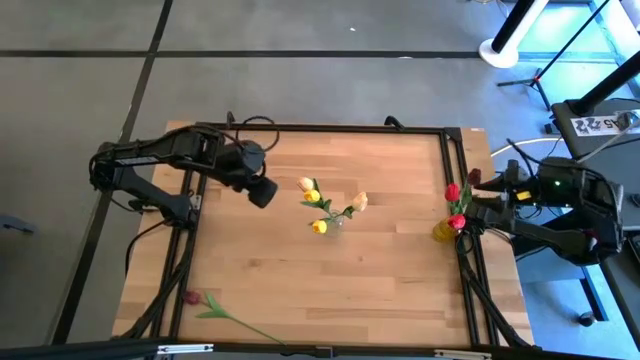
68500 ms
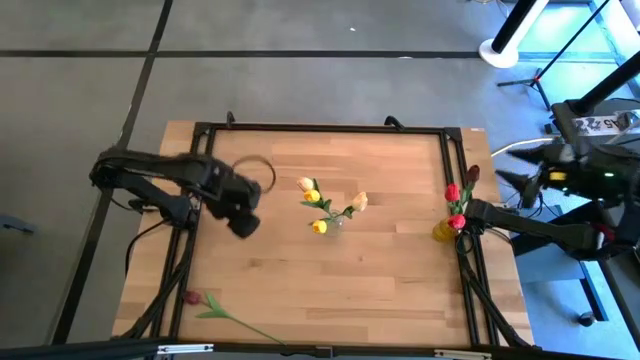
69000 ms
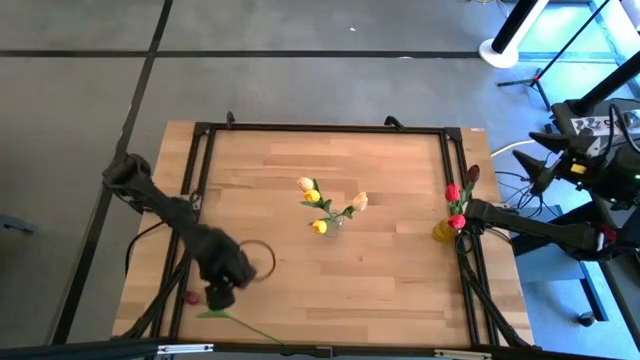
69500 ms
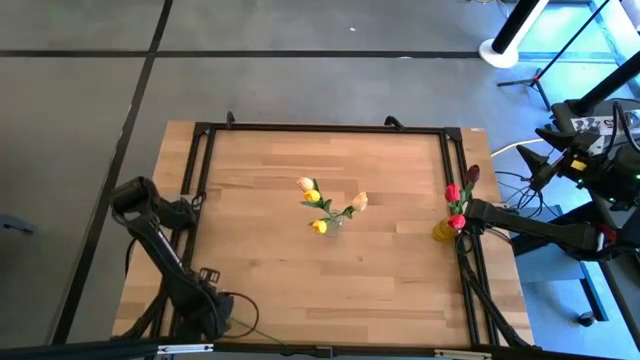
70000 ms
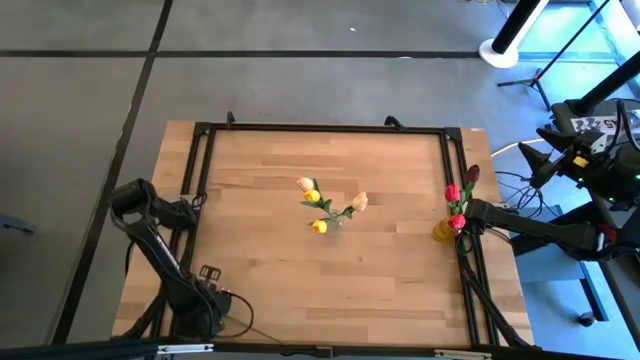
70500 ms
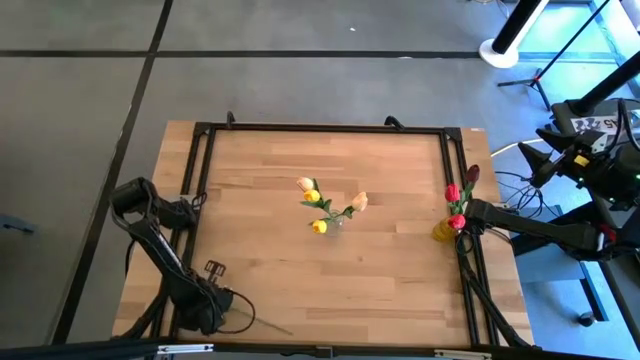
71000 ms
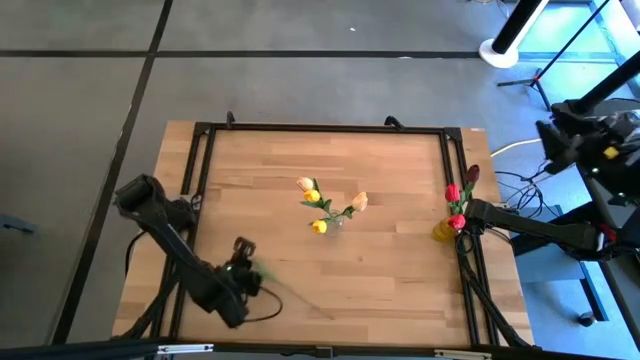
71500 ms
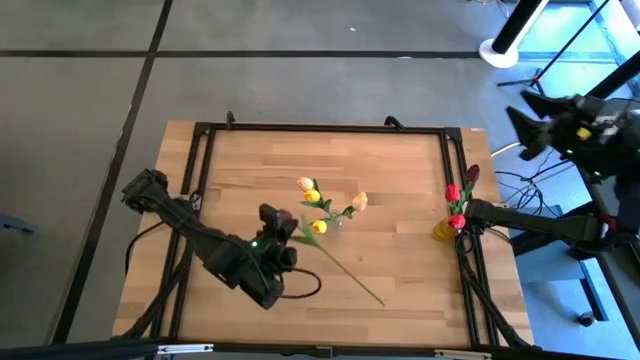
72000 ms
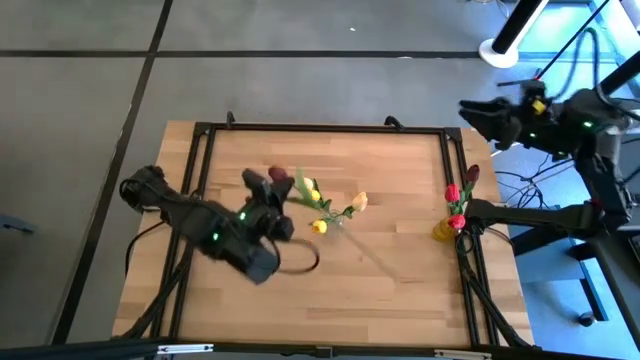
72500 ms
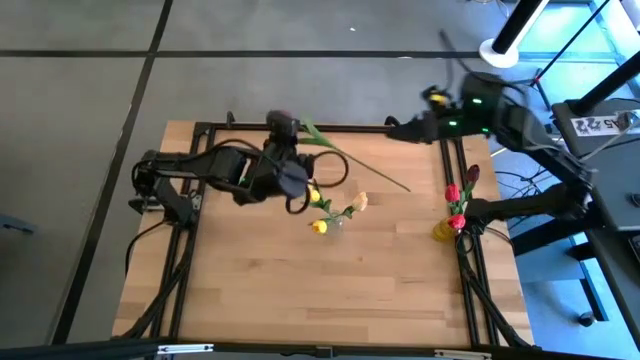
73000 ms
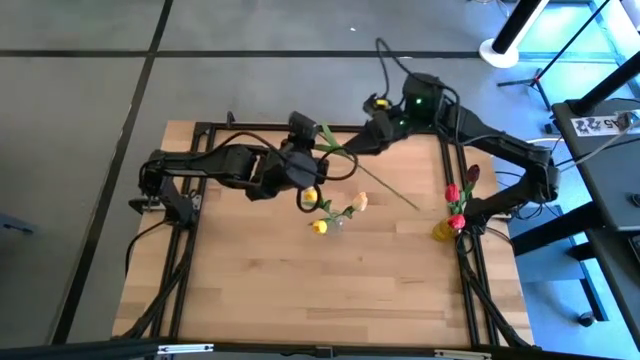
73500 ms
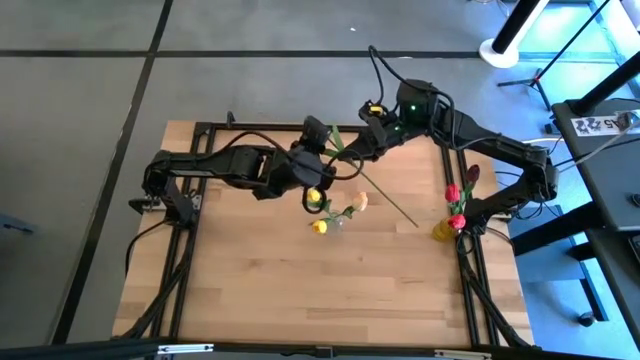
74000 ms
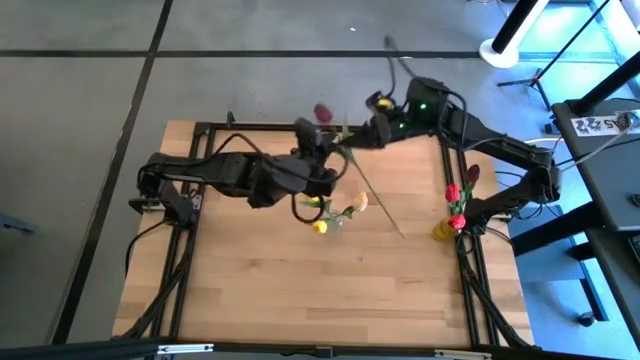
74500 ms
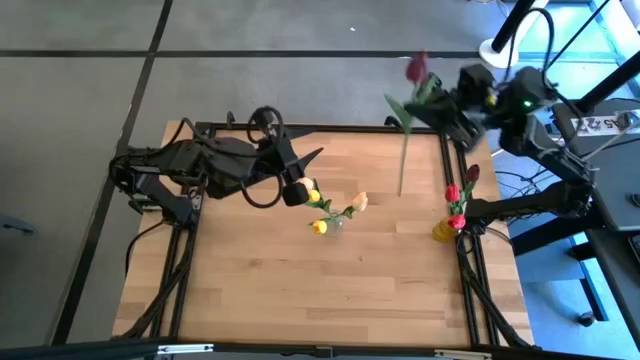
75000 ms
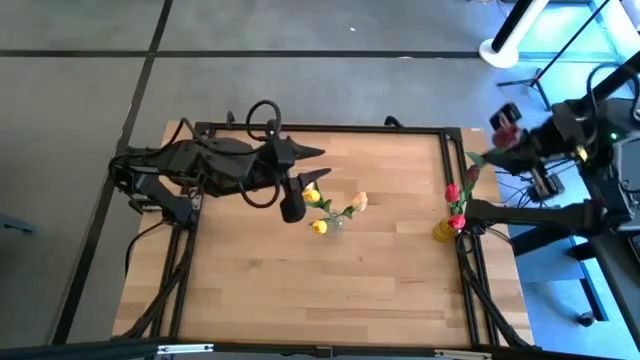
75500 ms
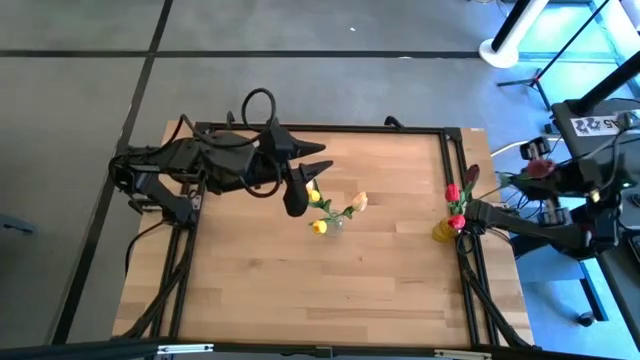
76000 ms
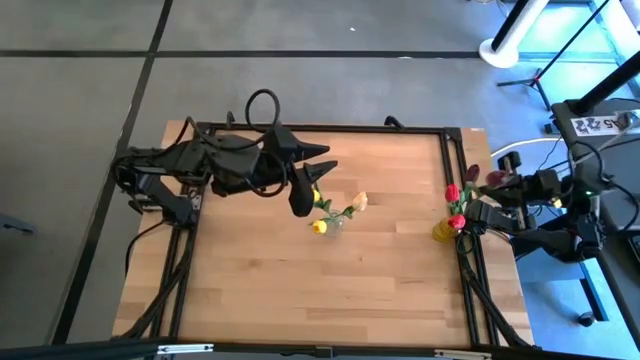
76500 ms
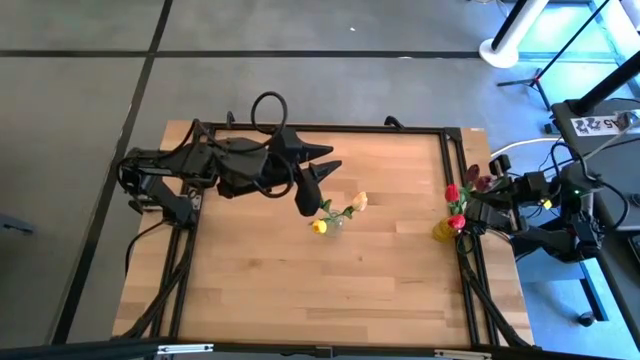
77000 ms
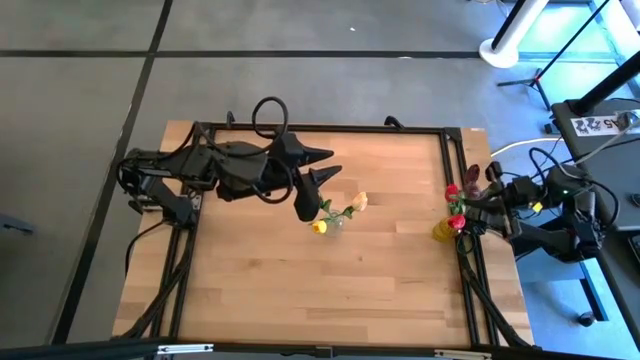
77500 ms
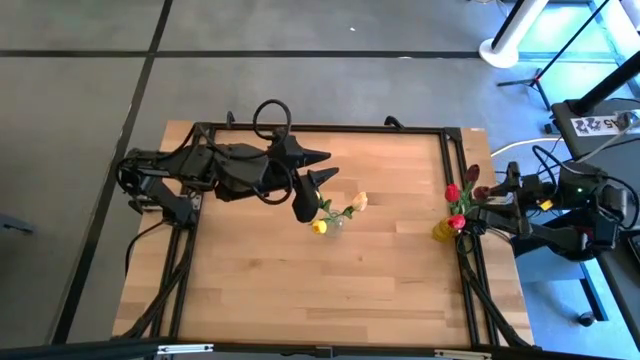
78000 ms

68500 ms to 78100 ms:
Task: Sort flowers into vase by color
Put the dark red tulip into the yellow vase

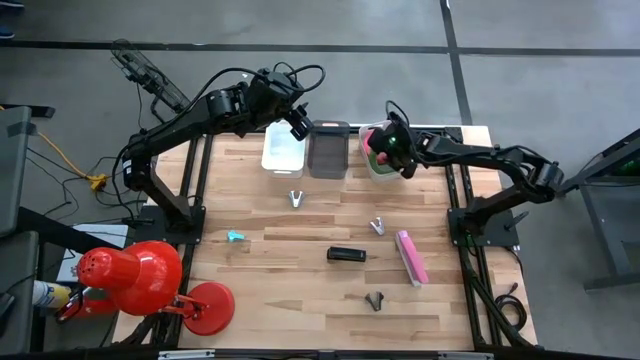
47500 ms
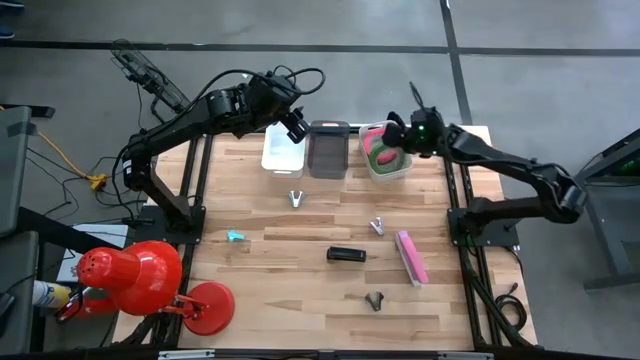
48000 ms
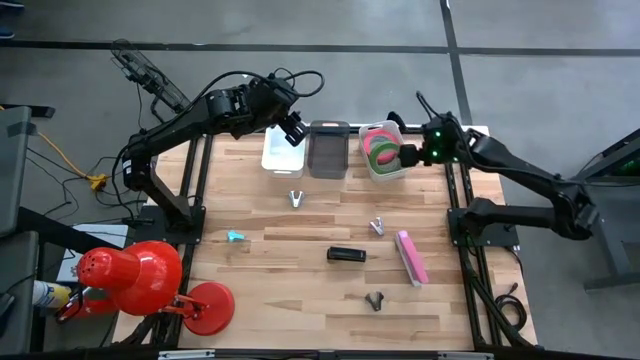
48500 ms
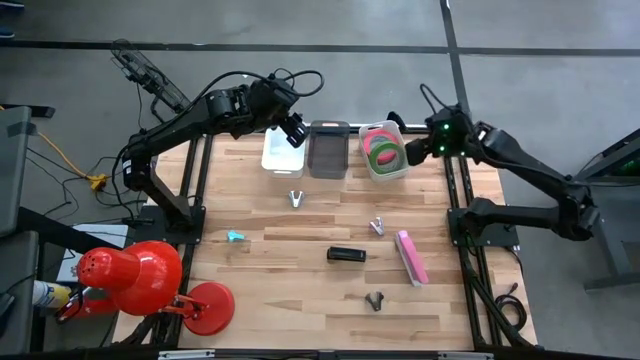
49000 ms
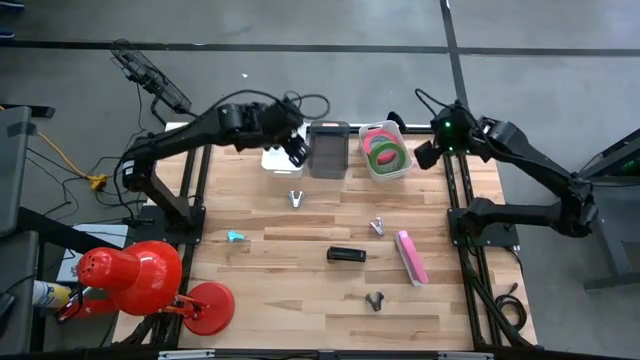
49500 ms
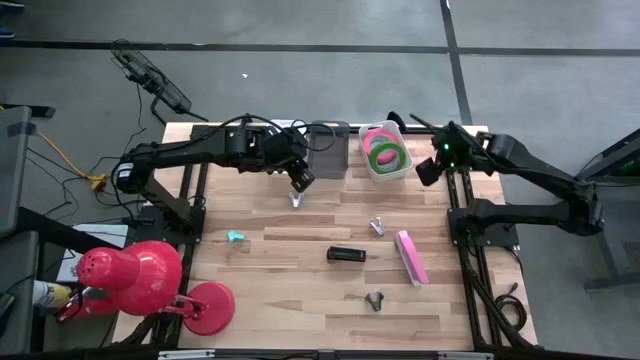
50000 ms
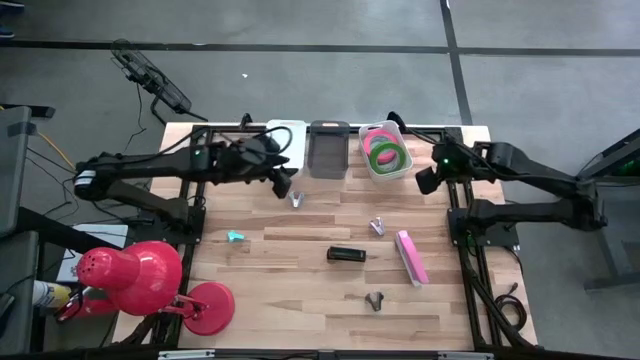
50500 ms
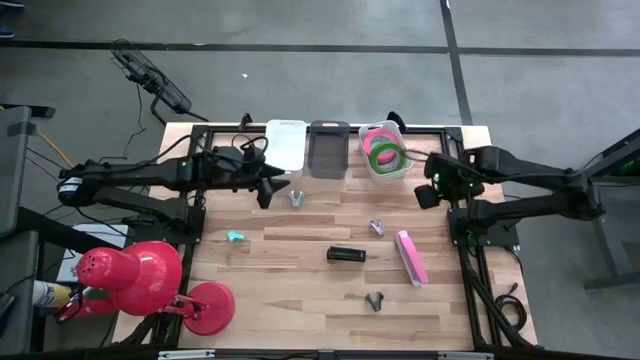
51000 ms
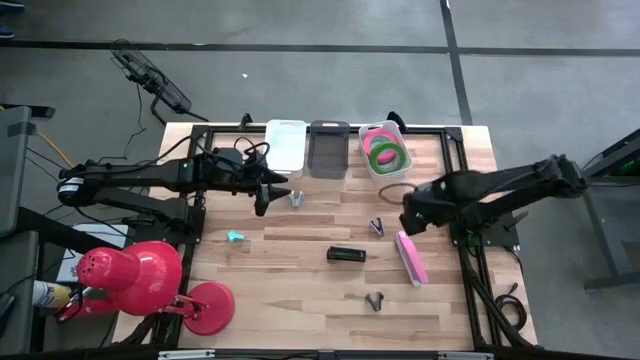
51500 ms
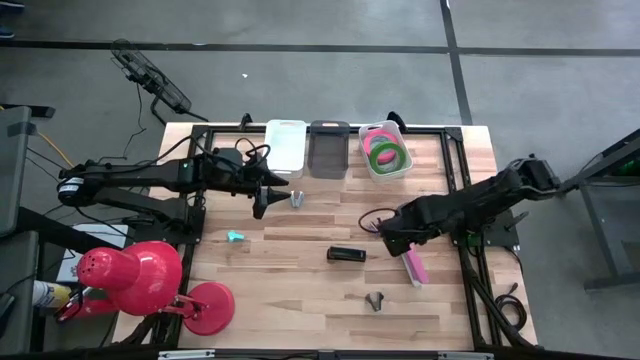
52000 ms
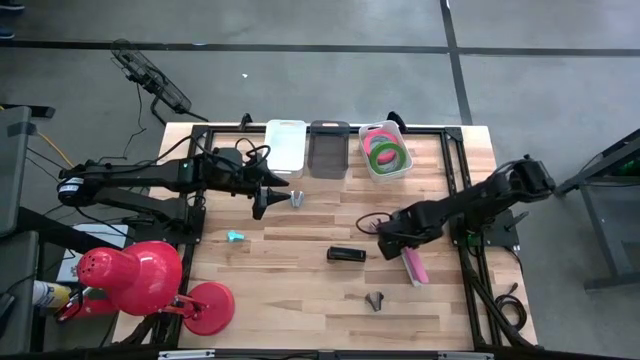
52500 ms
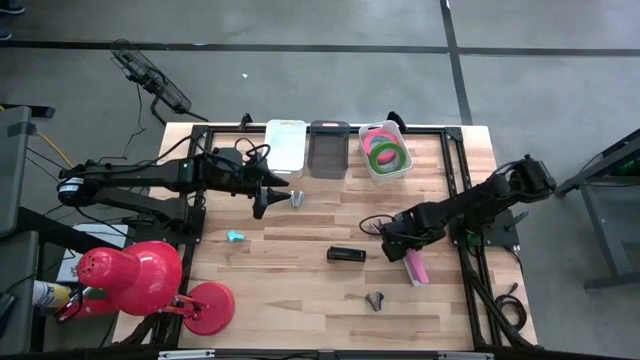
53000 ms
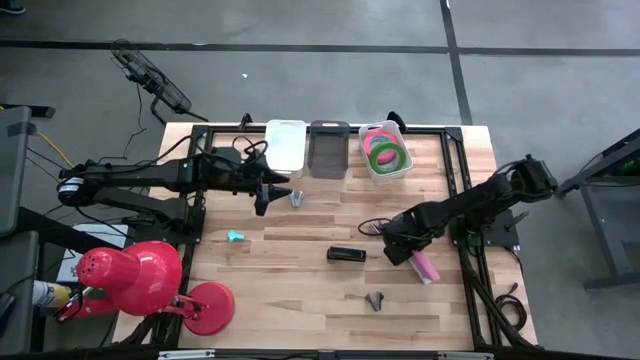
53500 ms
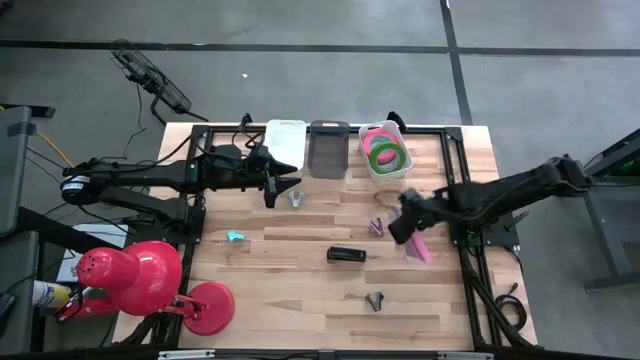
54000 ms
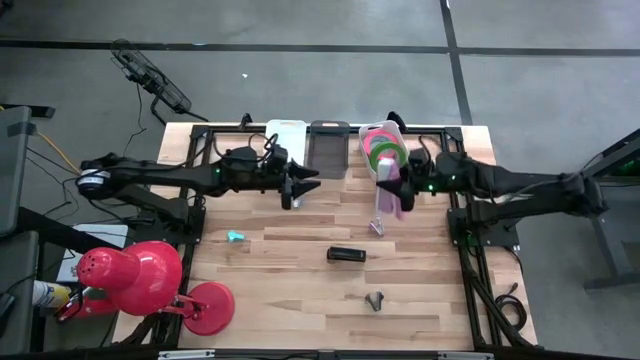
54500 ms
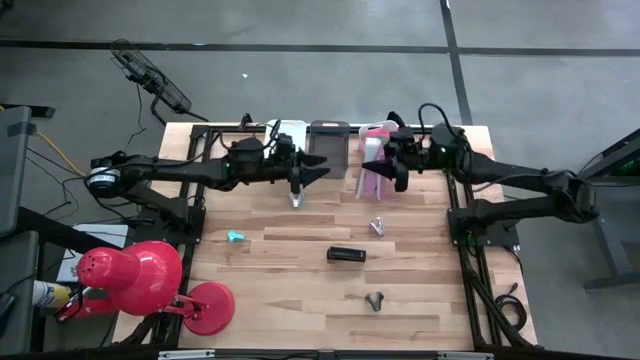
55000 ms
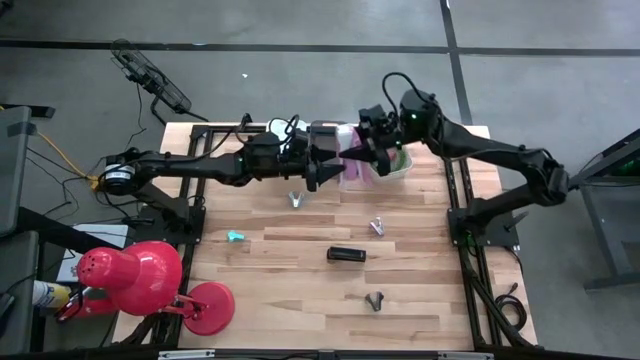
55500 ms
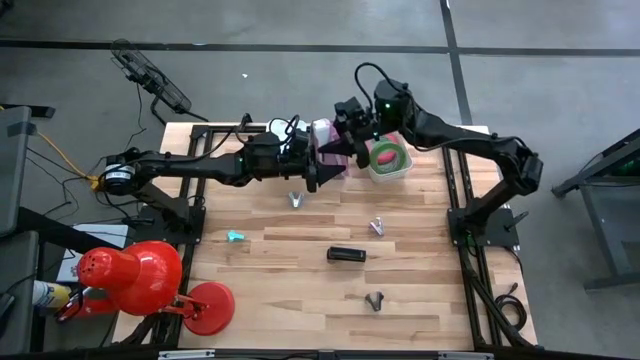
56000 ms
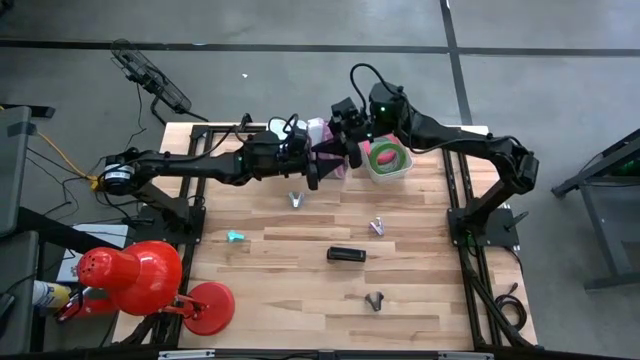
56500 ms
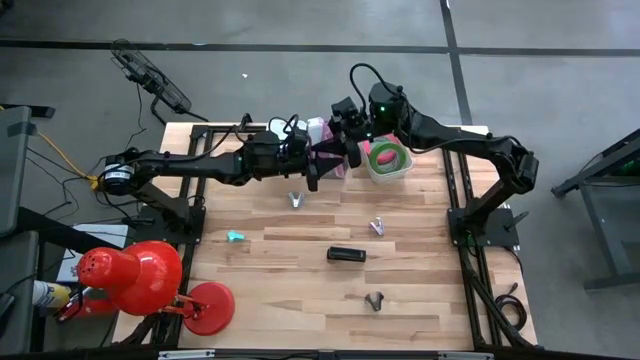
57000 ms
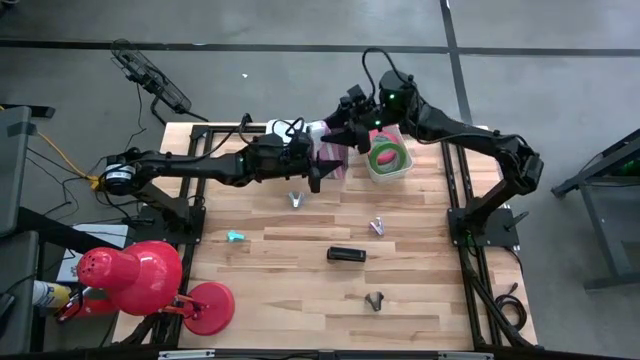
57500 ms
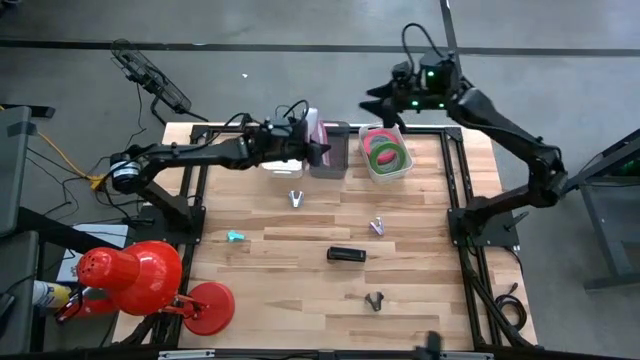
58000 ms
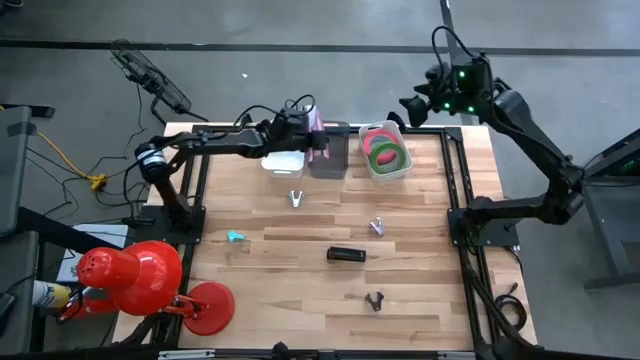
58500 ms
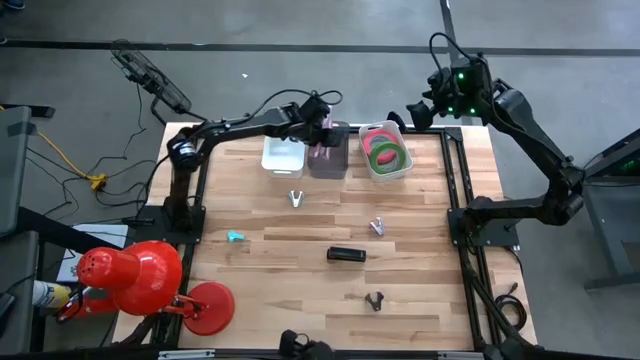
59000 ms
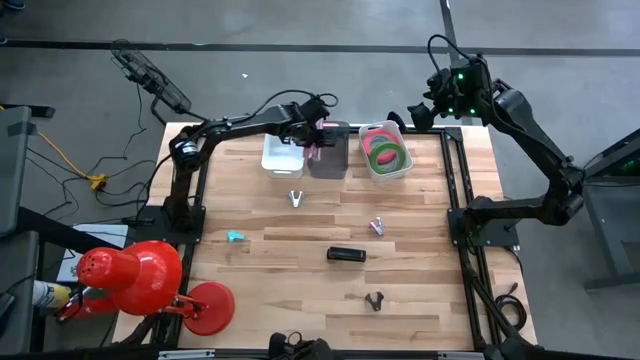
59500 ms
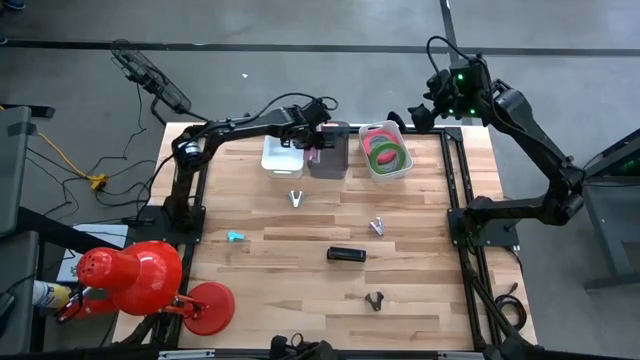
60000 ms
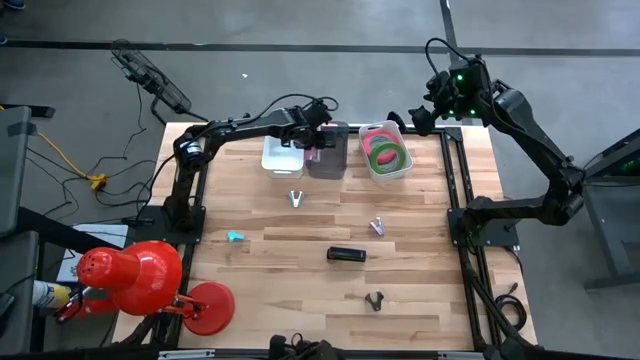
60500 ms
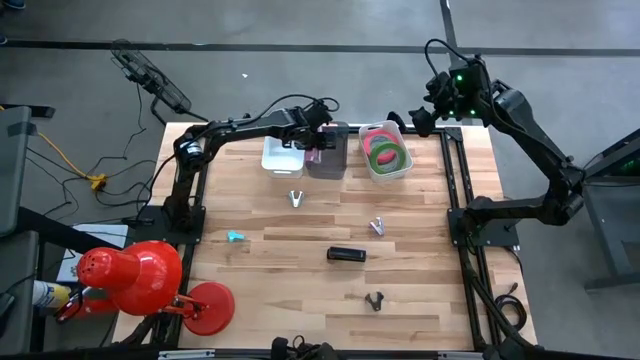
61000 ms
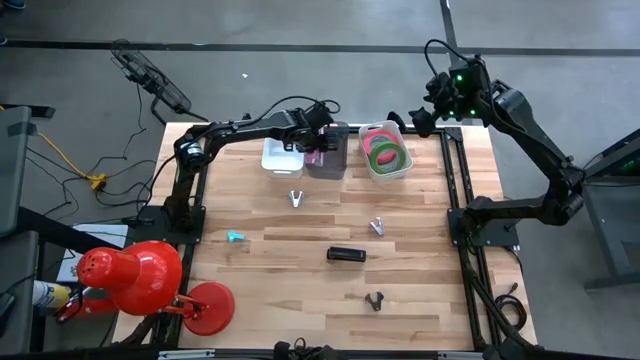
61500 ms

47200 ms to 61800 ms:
Task: Pick and place Stapler, Stapler remover, tape
Put the pink stapler into the black bin
